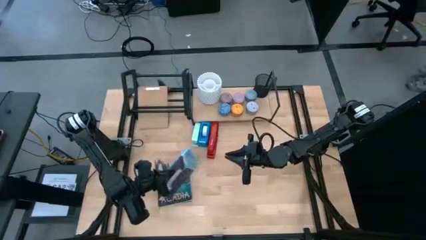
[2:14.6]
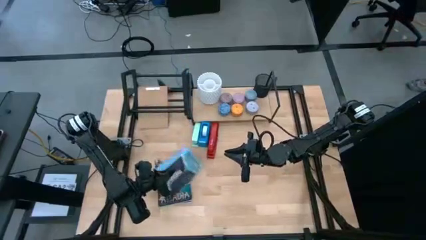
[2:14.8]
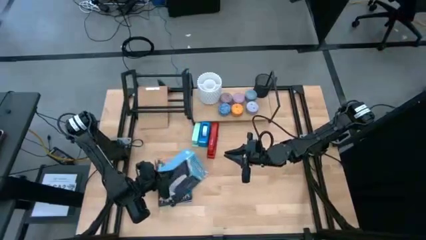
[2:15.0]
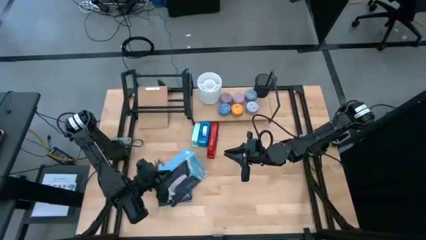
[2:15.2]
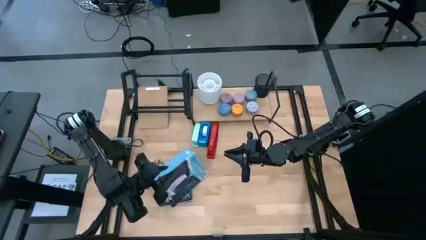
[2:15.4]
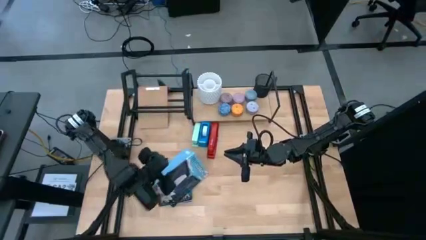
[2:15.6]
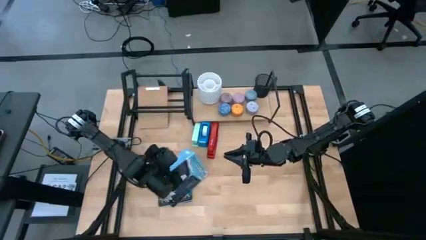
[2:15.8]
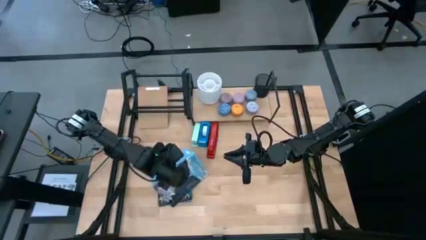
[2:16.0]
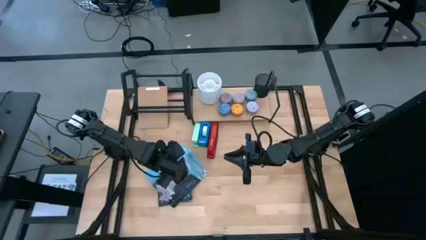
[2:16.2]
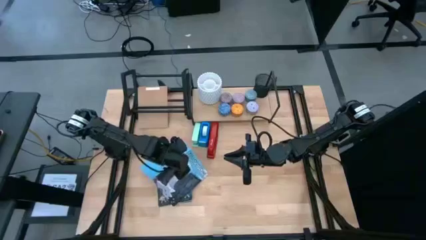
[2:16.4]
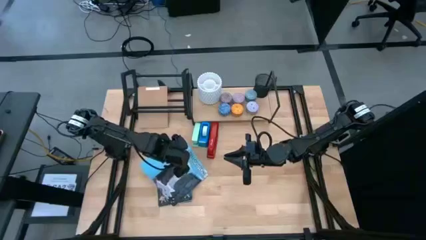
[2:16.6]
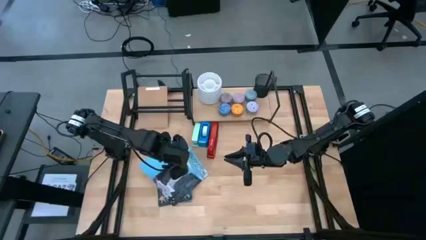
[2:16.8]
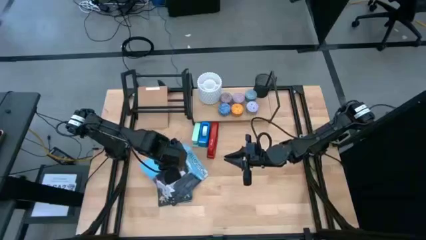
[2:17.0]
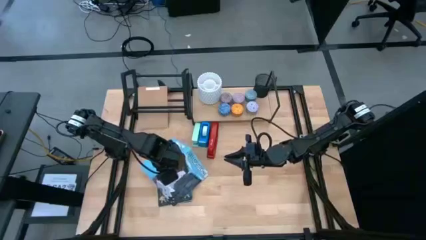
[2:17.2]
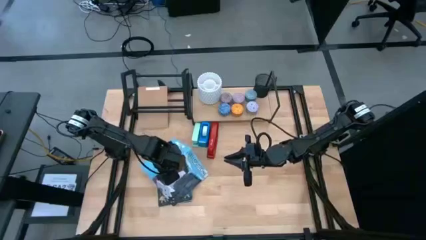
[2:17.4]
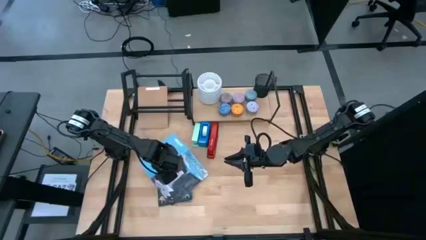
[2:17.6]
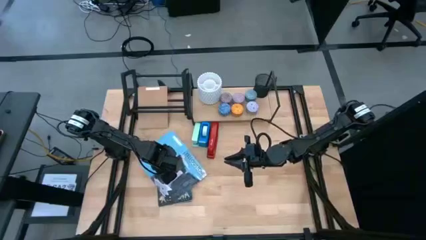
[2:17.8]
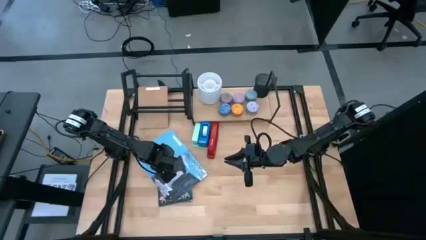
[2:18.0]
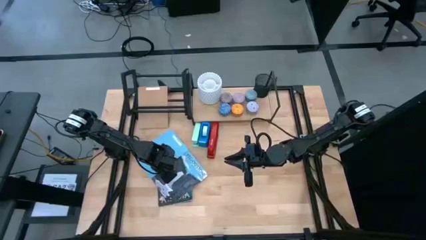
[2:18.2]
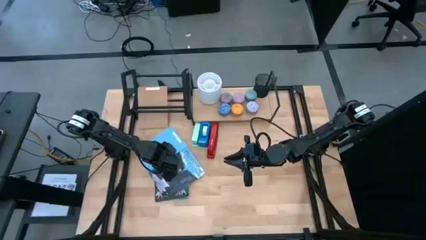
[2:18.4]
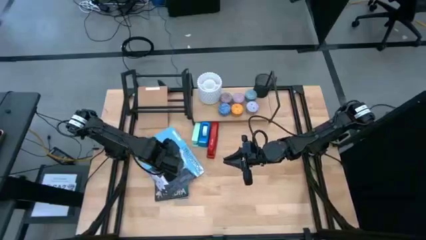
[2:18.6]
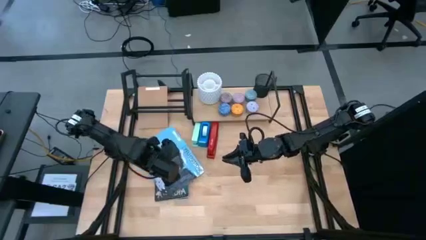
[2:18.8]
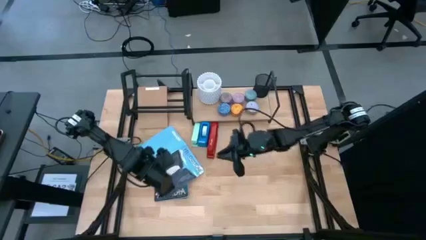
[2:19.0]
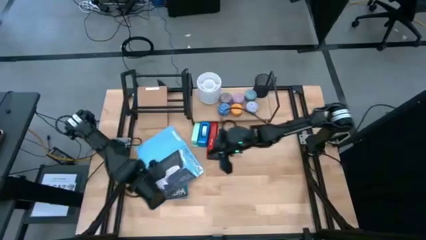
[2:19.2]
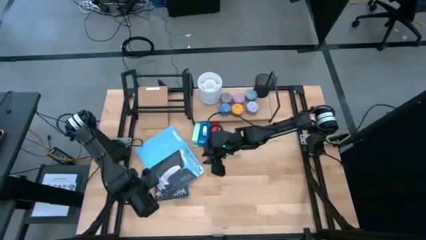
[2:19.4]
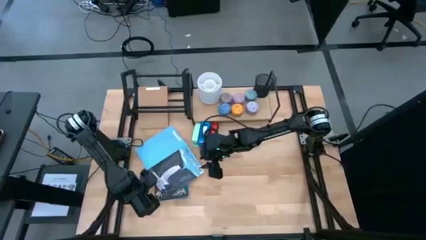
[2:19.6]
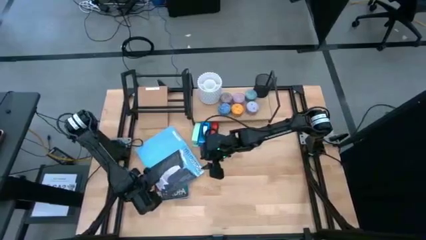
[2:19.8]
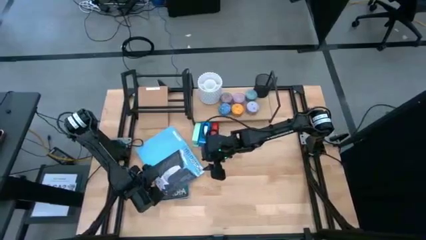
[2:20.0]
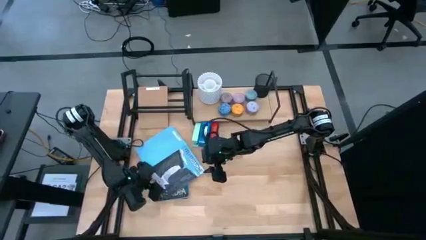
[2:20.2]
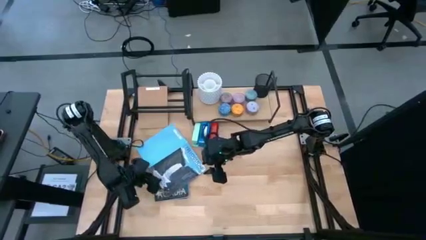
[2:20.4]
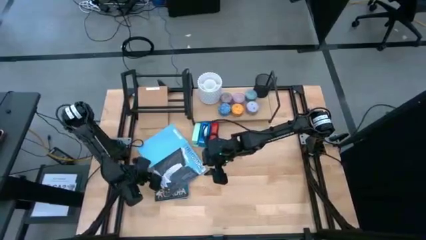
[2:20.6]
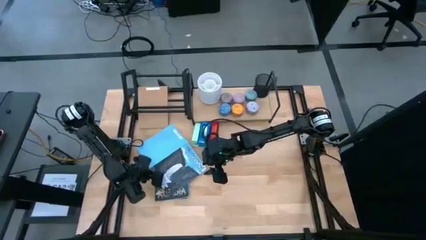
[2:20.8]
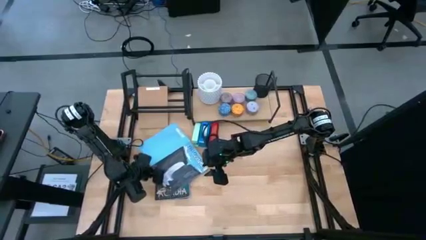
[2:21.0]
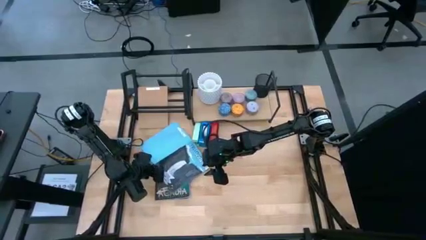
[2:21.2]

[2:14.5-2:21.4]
Task: Stock shelves
Remove the blue book from the bookshelf

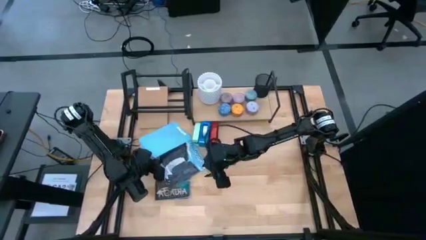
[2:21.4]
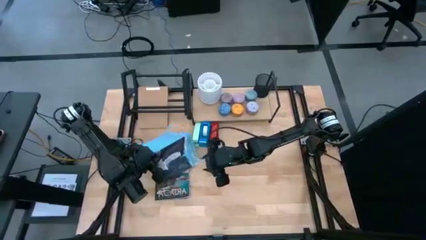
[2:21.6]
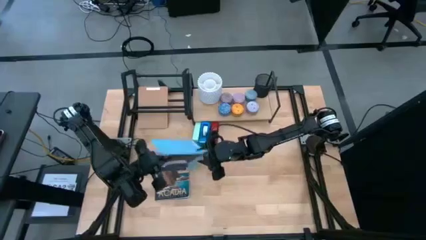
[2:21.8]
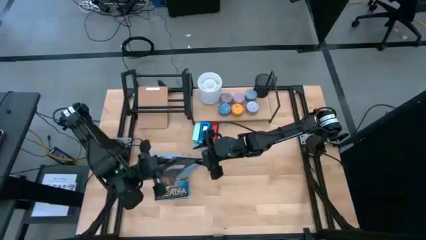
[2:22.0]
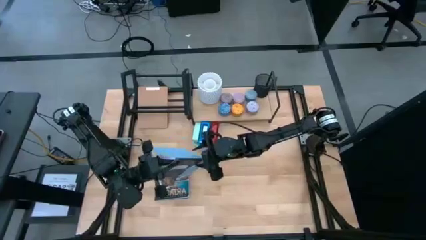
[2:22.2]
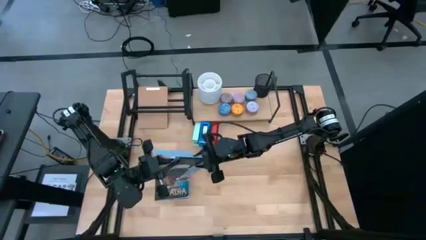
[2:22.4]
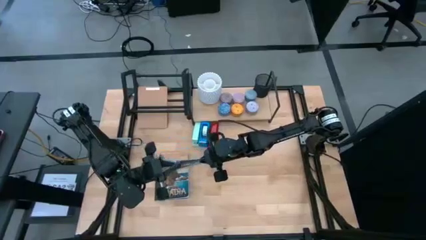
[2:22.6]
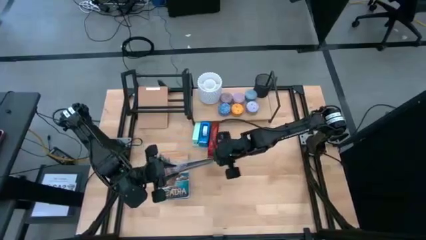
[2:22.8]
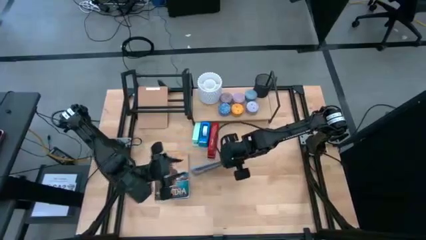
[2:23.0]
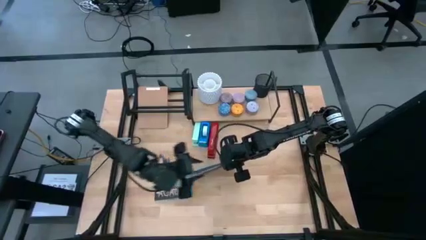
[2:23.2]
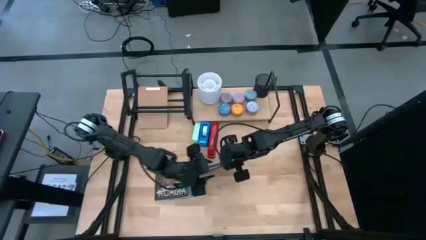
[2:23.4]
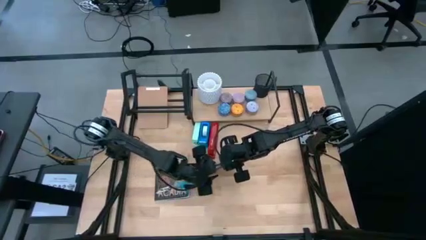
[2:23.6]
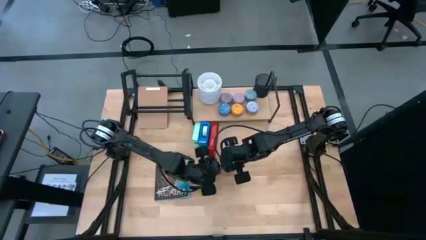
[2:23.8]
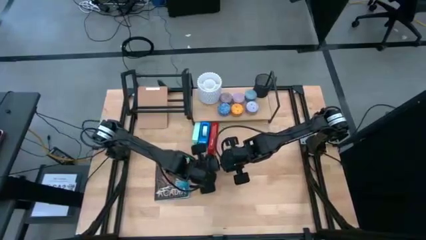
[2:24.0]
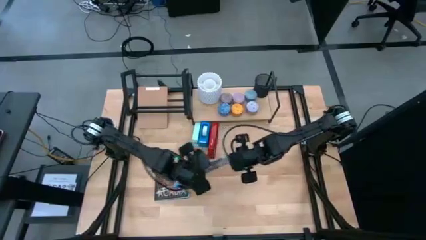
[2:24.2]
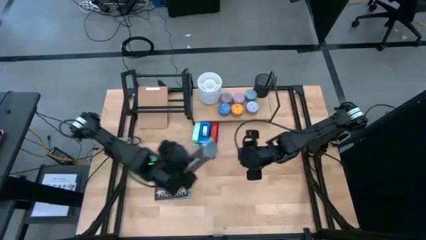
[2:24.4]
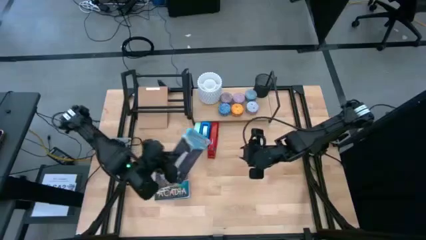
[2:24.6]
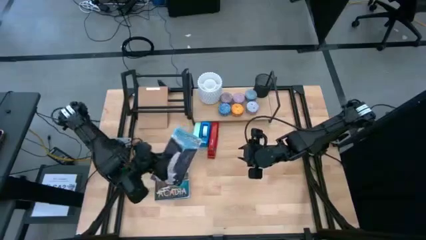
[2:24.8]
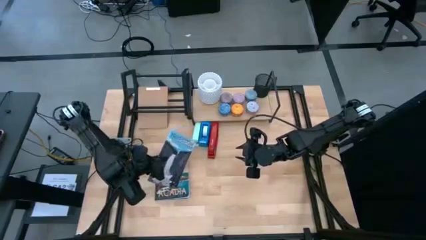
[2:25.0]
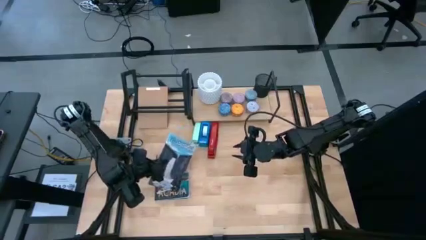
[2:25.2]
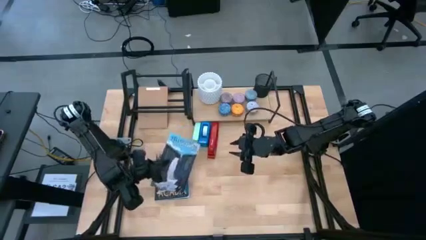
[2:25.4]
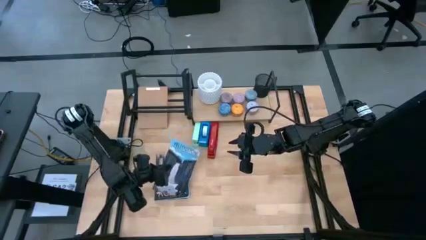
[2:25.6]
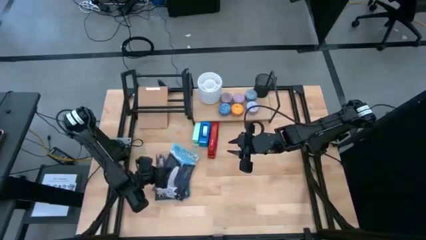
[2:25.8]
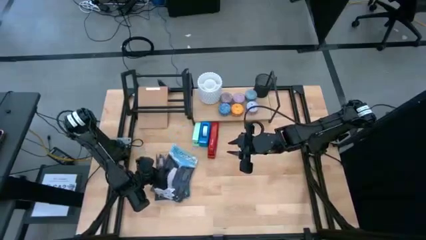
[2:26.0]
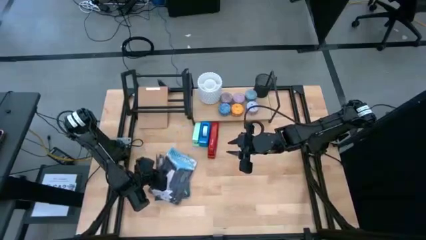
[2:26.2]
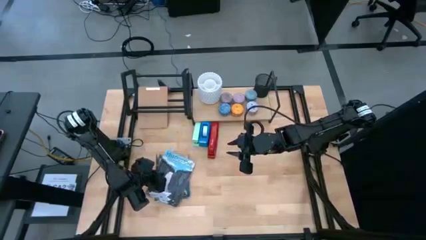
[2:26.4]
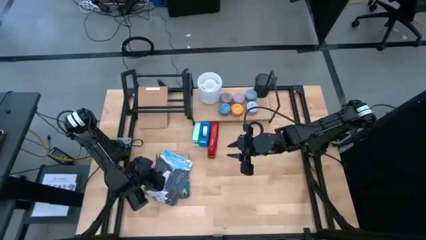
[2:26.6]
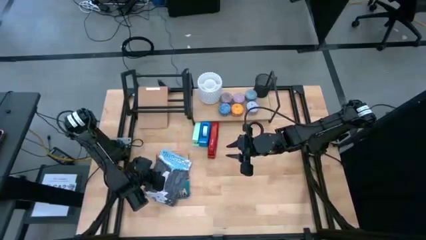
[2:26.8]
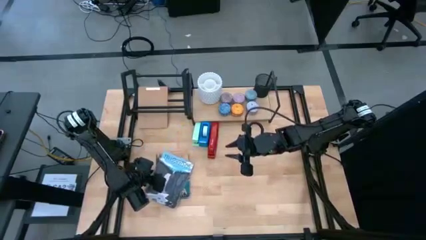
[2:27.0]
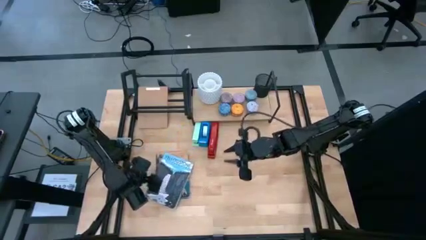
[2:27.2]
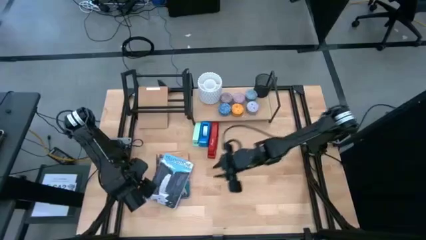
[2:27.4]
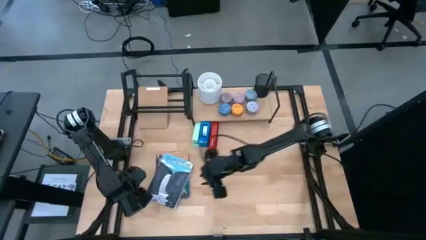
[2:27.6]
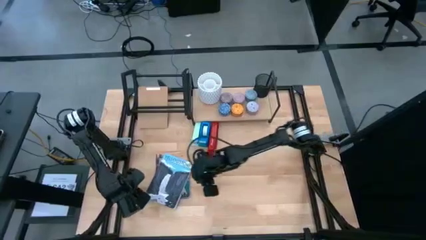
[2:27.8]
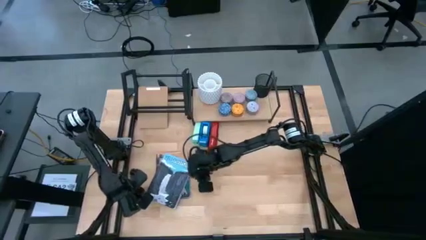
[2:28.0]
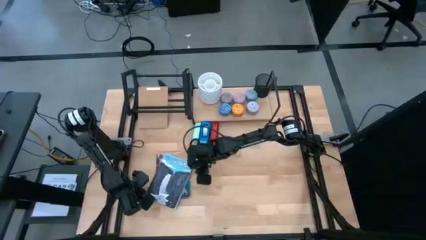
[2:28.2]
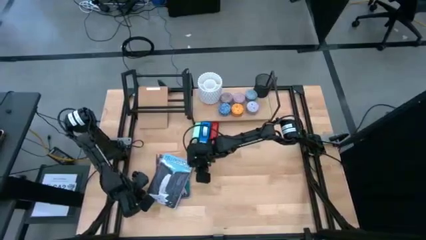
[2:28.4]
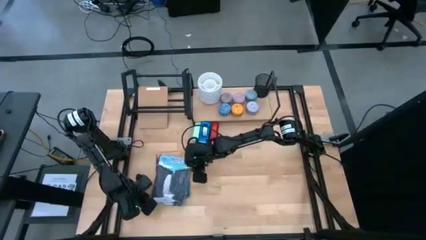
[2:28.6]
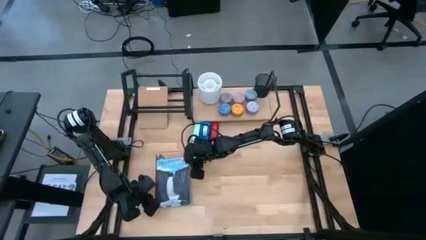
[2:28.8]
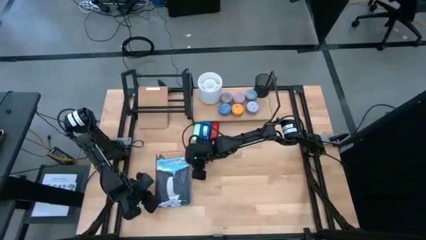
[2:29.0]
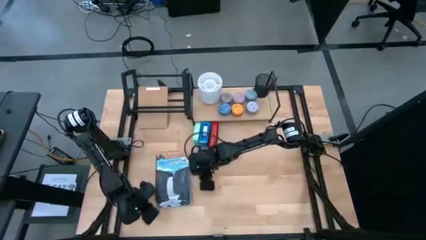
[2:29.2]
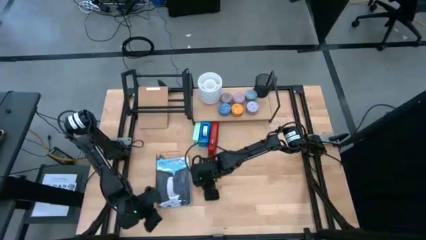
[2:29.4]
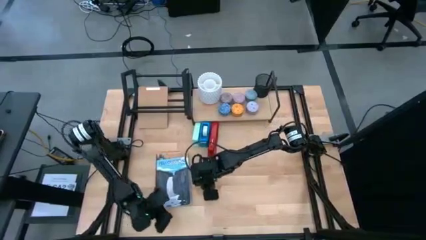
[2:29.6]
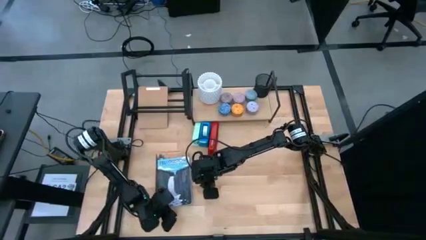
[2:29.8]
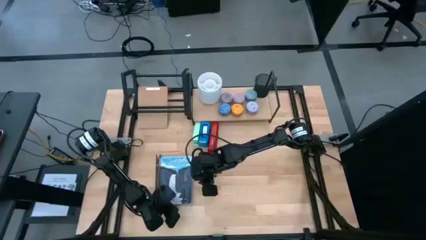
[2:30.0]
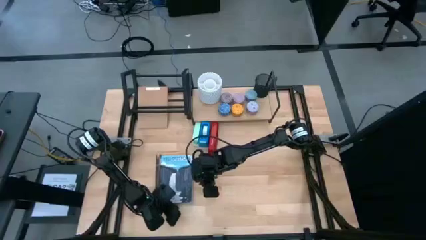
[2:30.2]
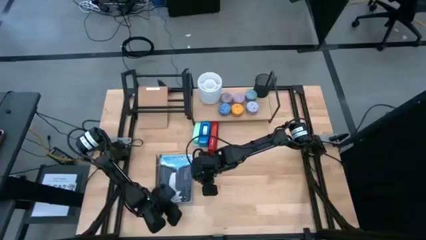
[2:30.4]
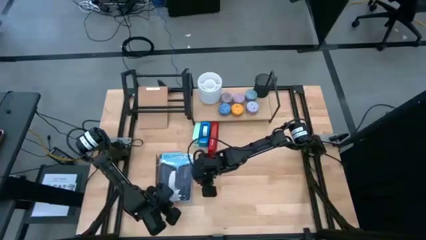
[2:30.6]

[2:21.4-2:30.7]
Remove the blue book from the bookshelf
